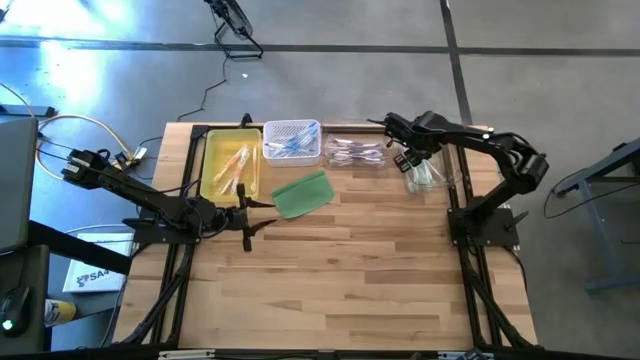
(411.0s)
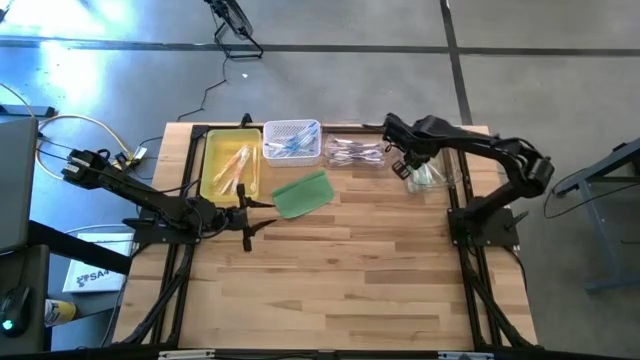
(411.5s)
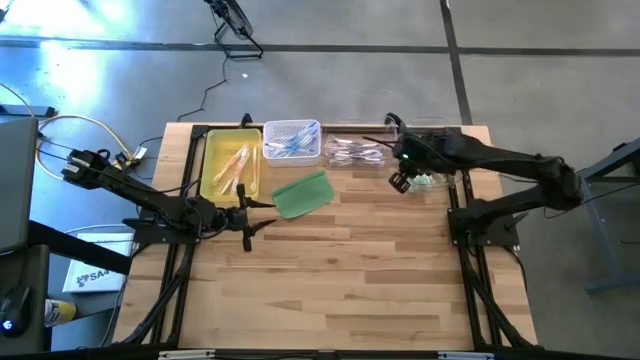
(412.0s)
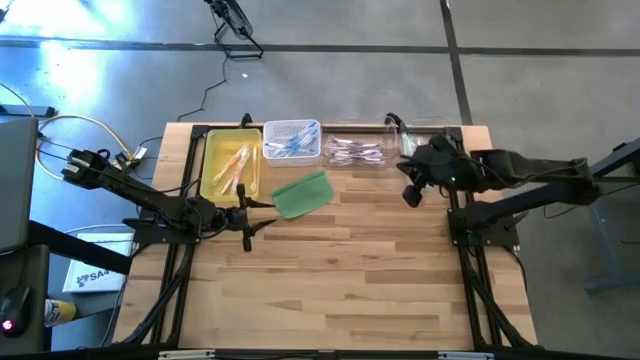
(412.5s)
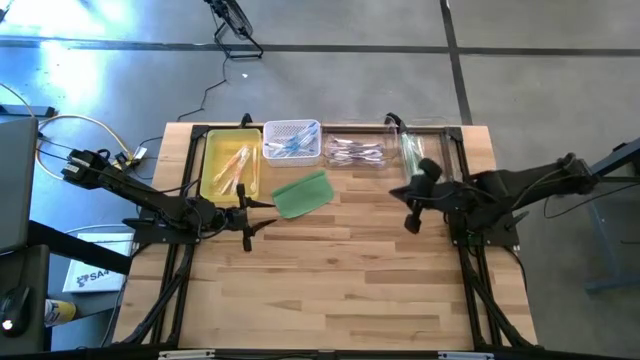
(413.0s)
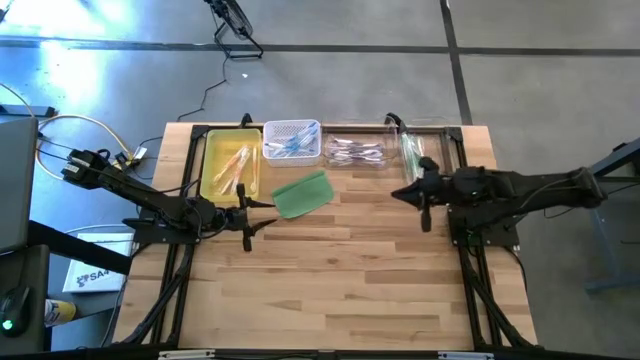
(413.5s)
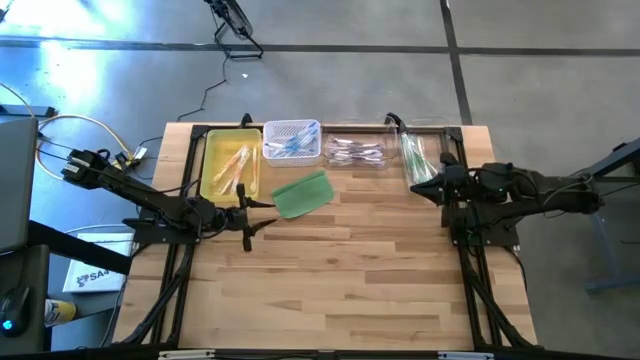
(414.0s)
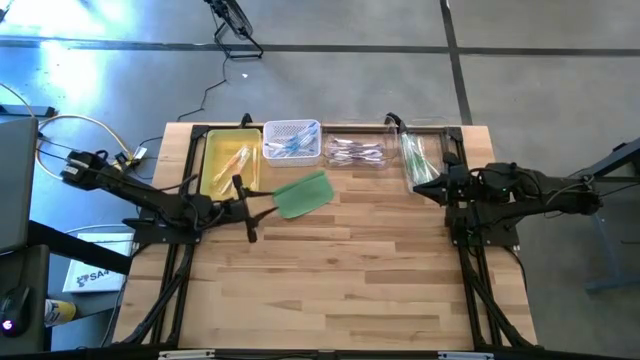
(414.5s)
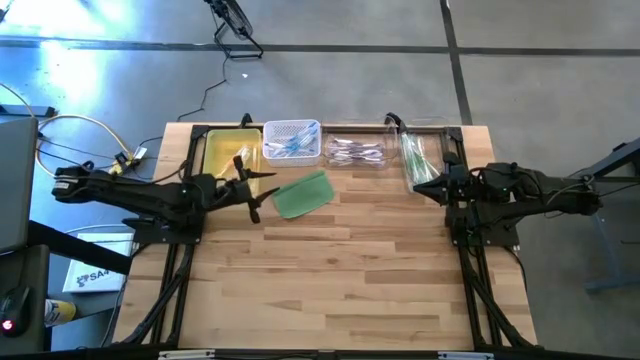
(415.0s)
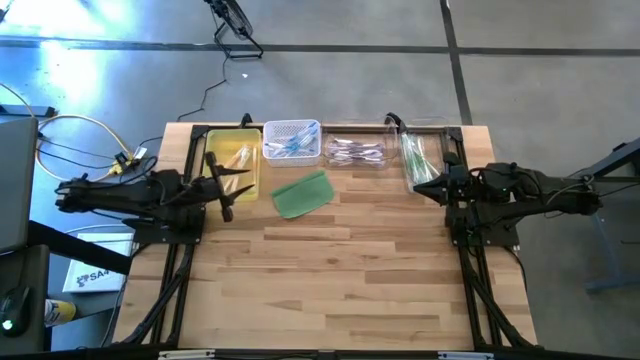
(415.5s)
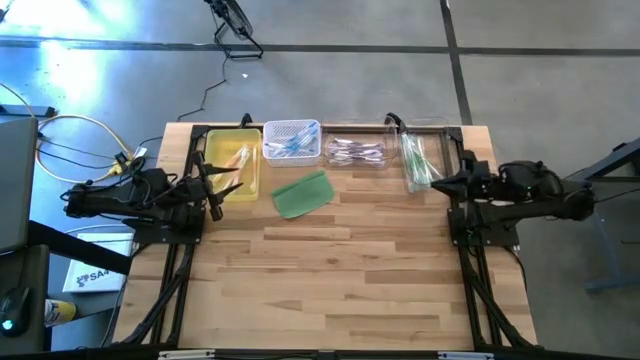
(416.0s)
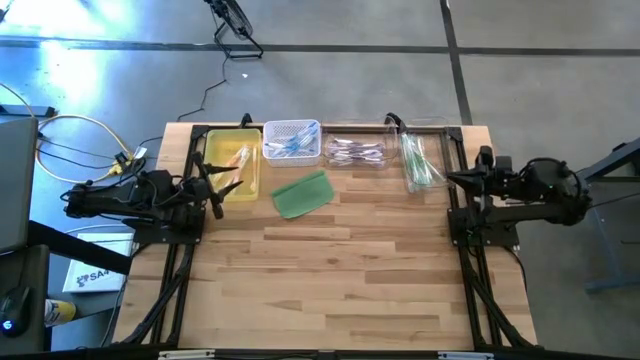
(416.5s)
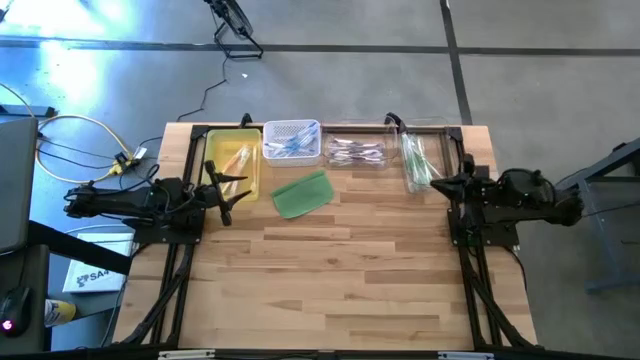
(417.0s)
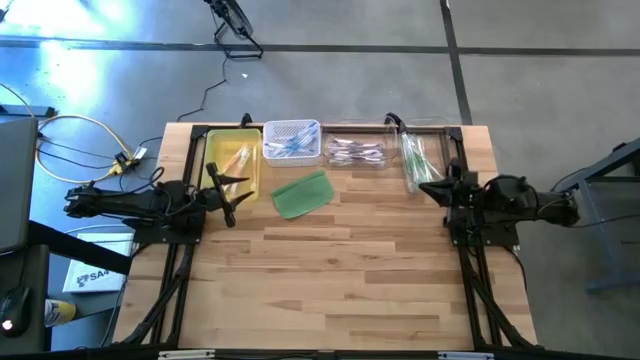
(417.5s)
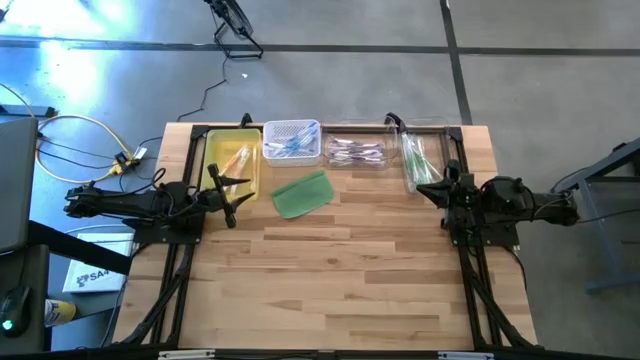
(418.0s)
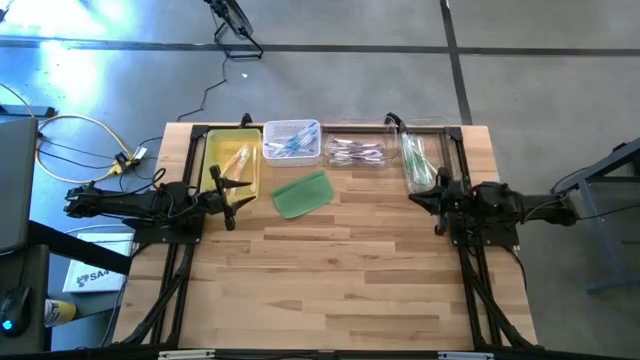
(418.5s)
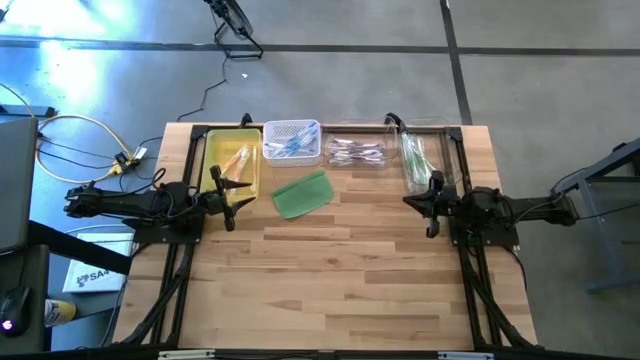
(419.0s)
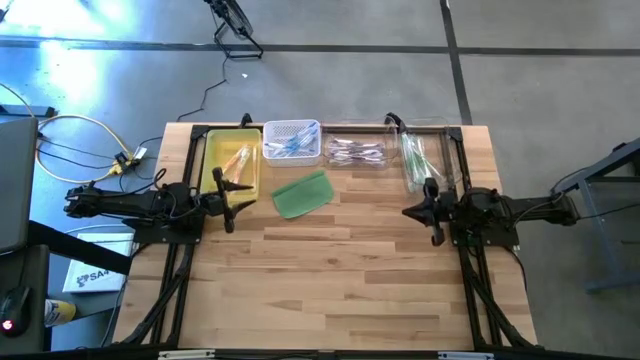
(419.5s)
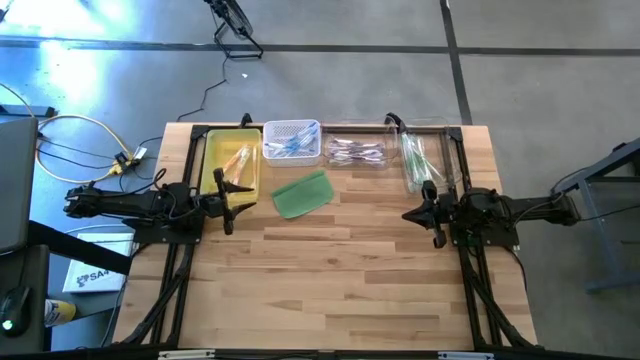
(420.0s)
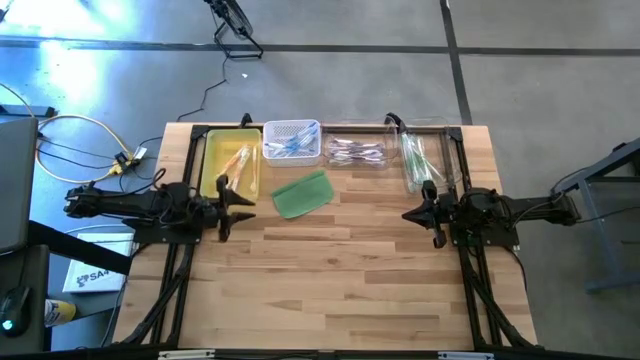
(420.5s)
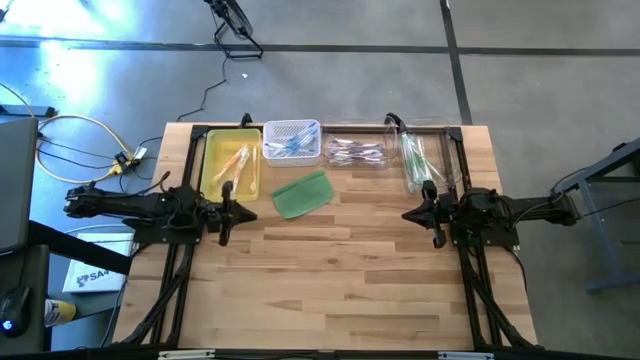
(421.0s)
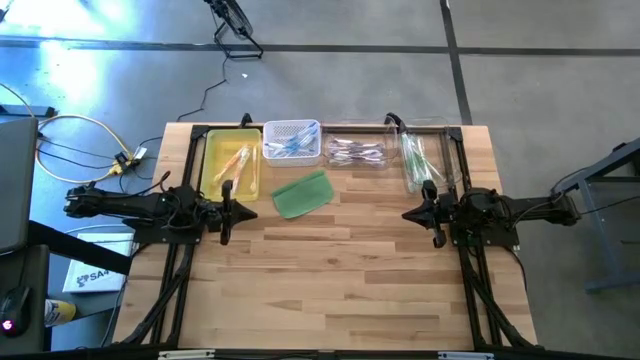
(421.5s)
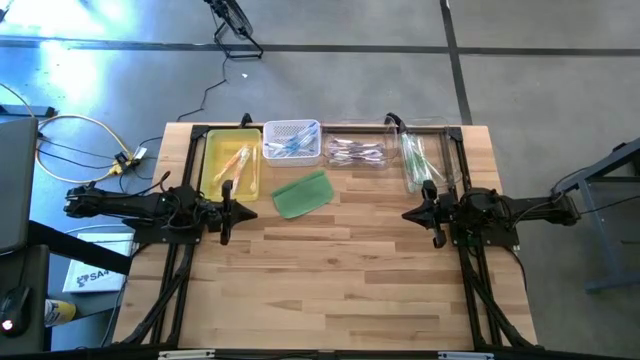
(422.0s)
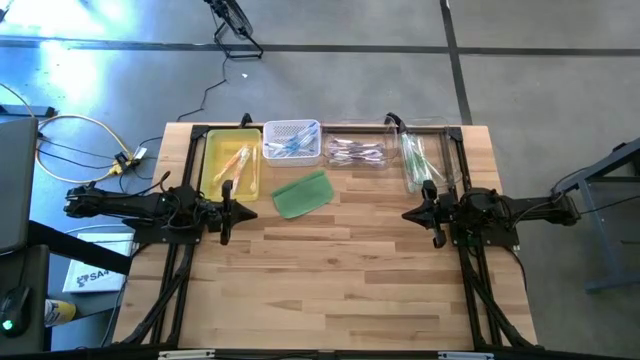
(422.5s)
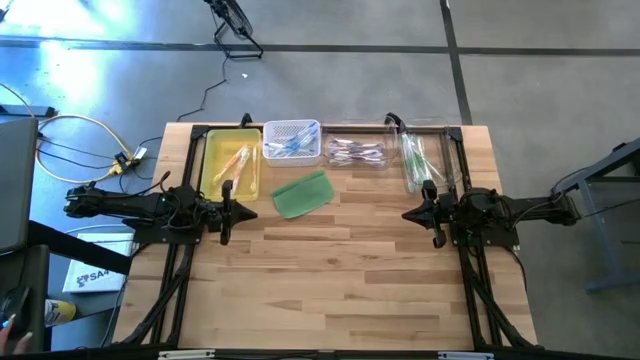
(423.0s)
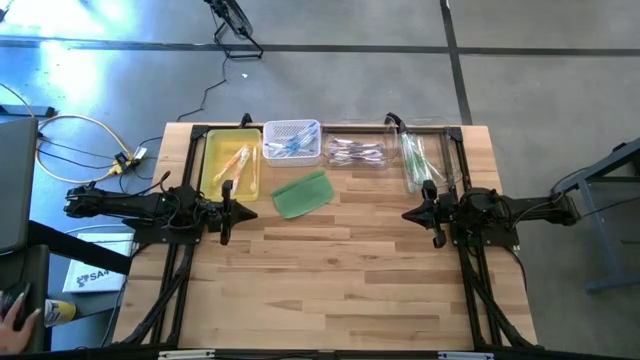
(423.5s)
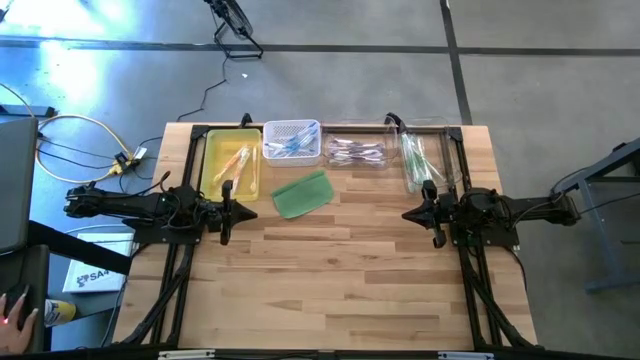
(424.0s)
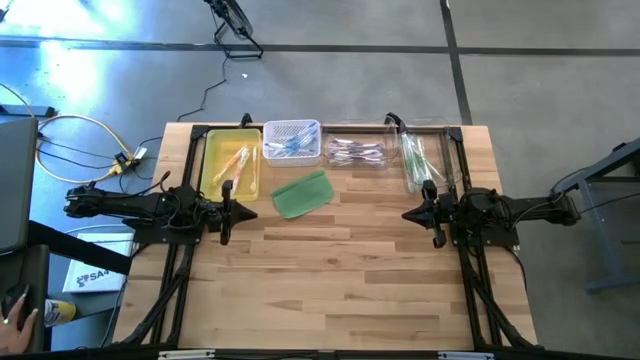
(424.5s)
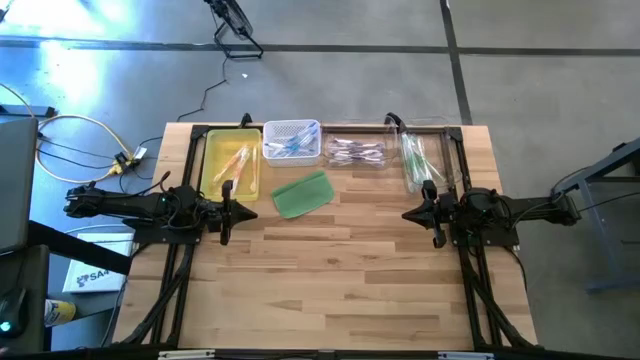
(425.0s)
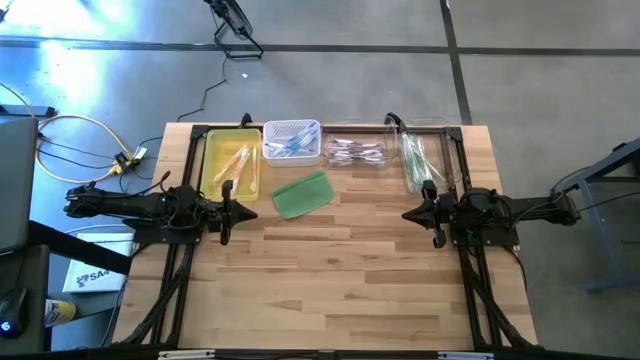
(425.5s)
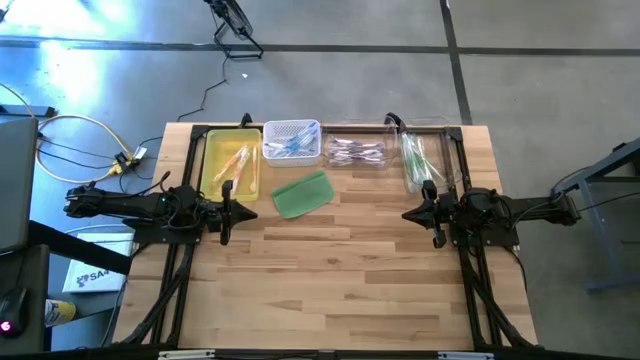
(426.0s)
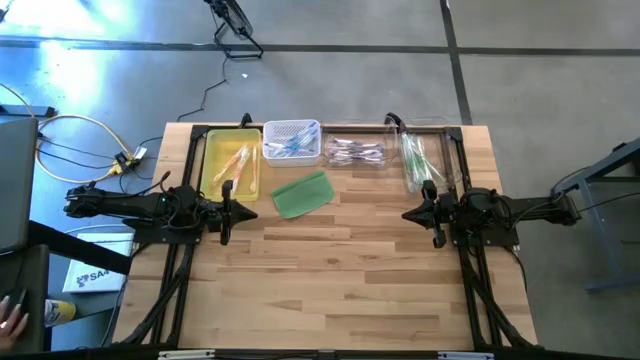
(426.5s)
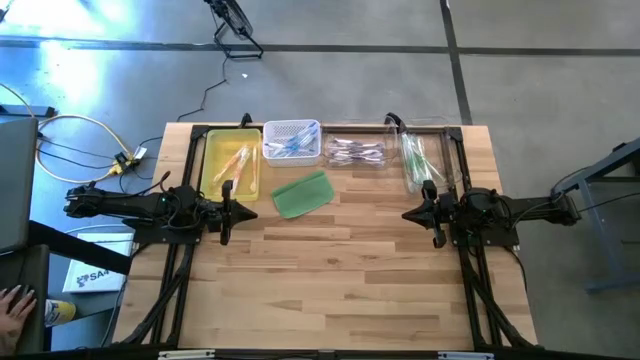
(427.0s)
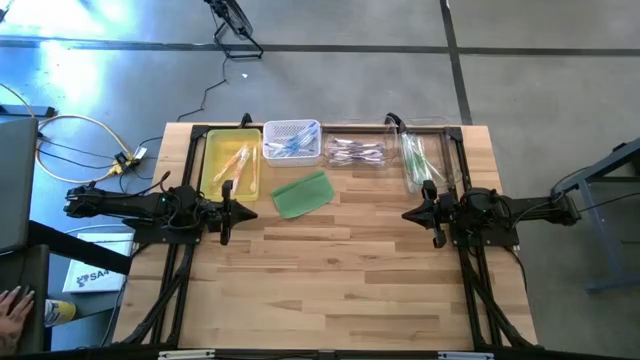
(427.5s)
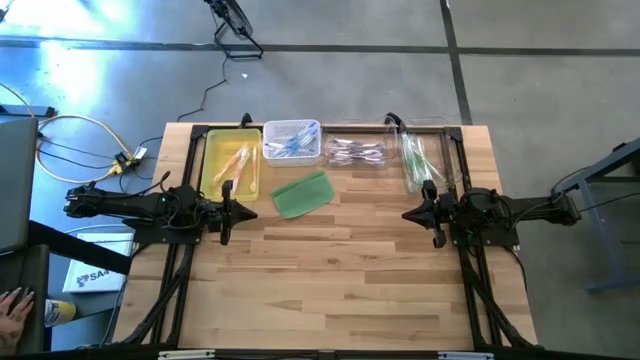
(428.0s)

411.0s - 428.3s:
Task: Pick & Place Toothbrushes
Return to Home Position

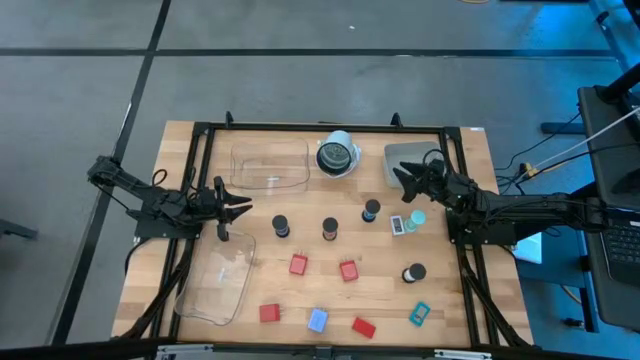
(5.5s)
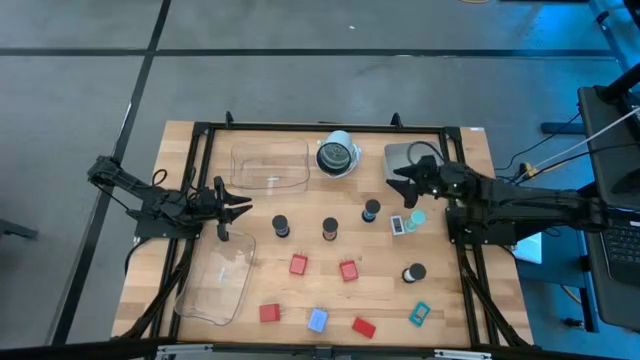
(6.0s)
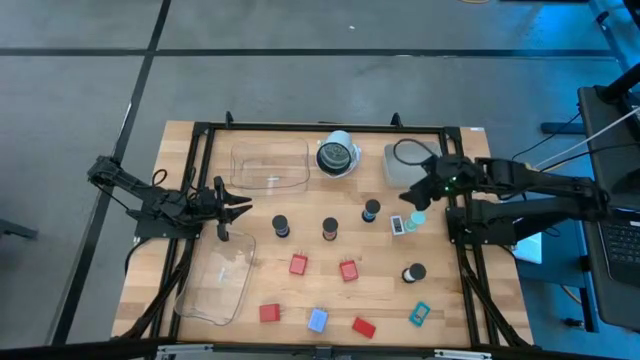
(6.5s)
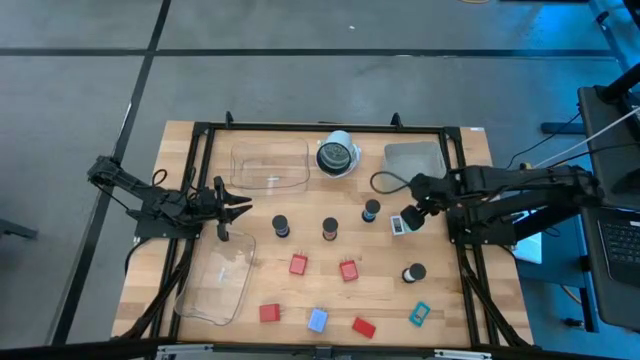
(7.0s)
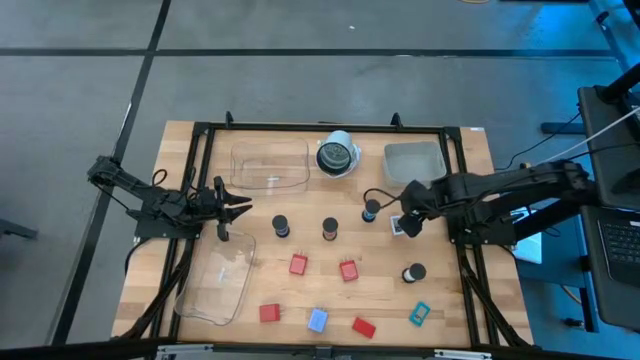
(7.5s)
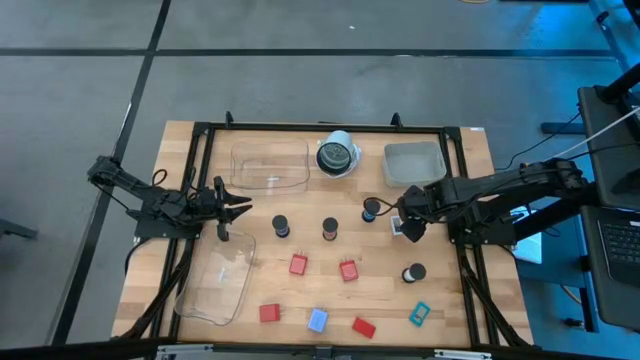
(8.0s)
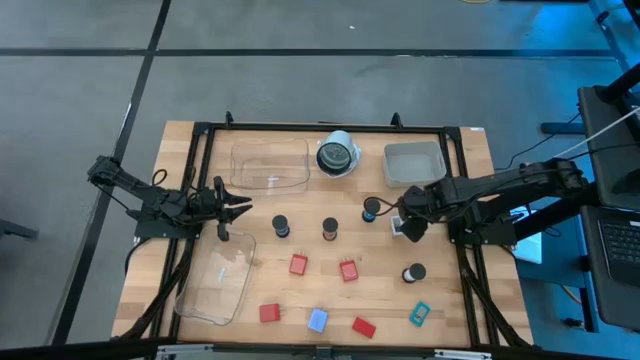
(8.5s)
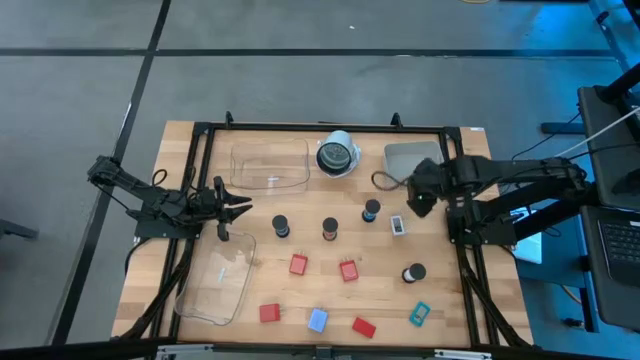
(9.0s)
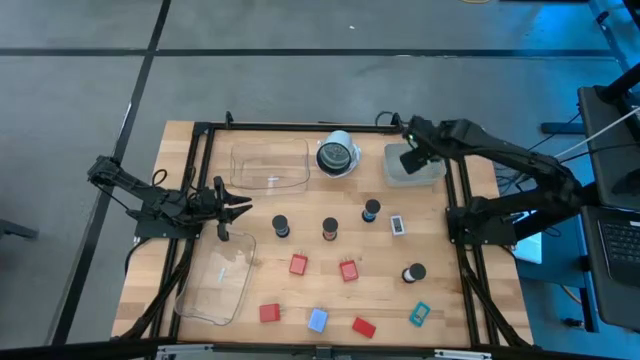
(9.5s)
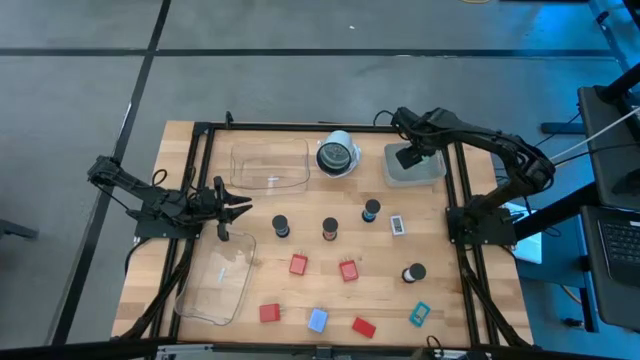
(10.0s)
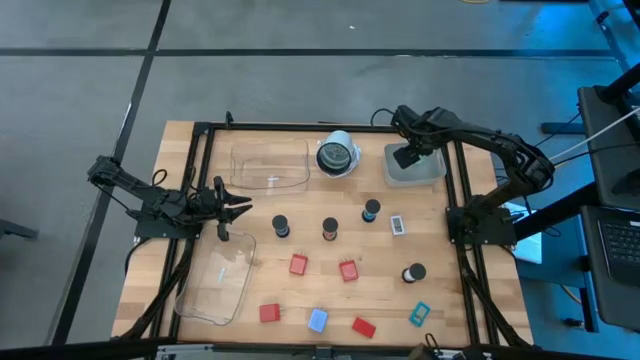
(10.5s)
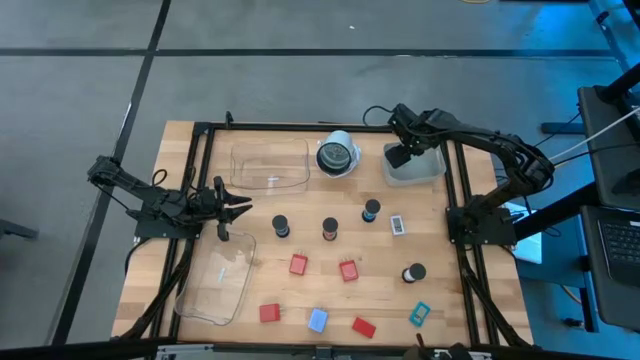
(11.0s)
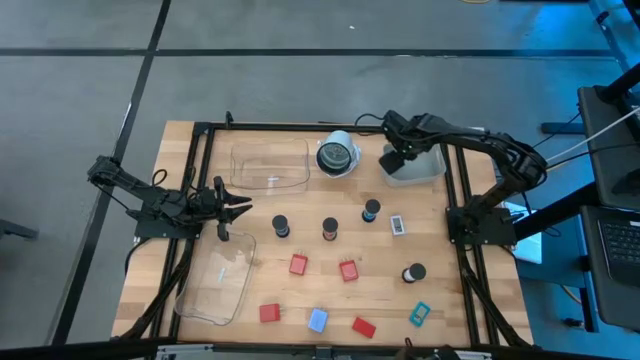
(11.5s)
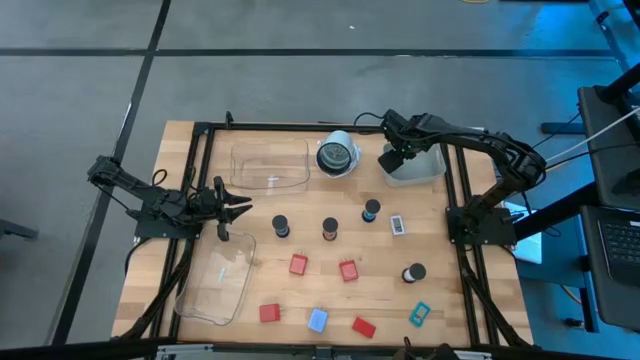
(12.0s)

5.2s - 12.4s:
Task: Pick & Place Office items
Put the light green hourglass into the gray bin
